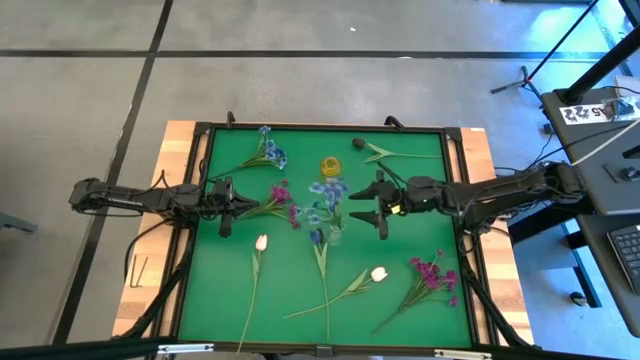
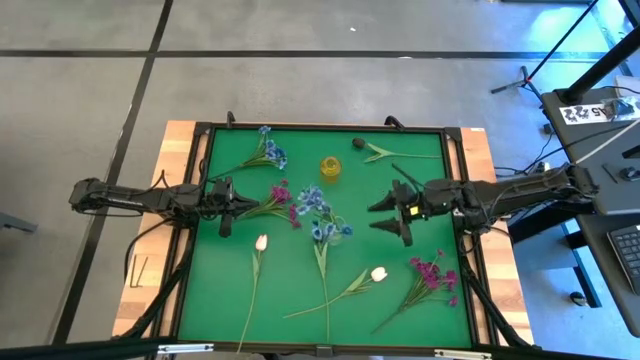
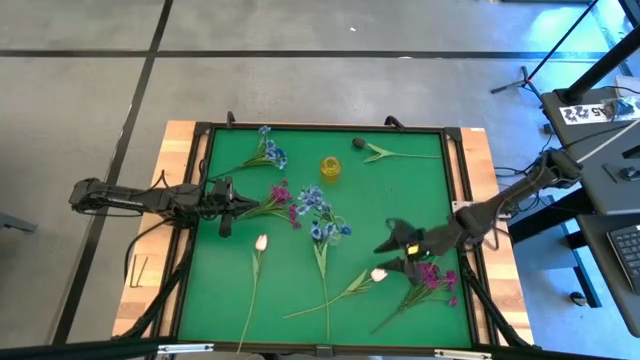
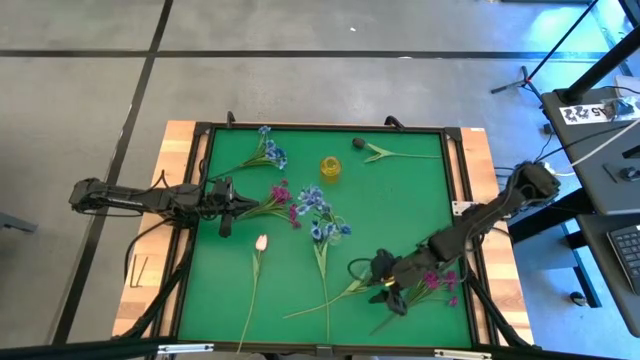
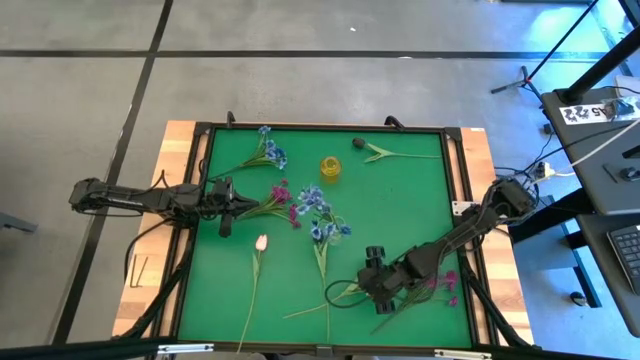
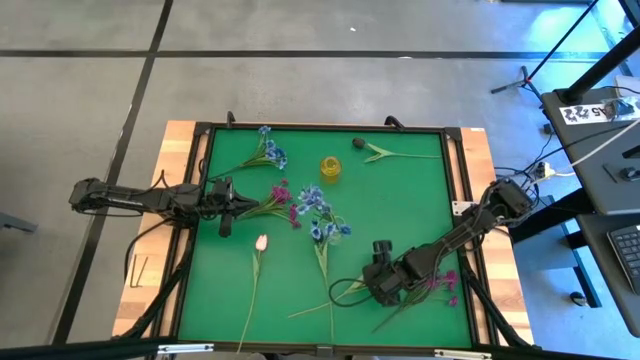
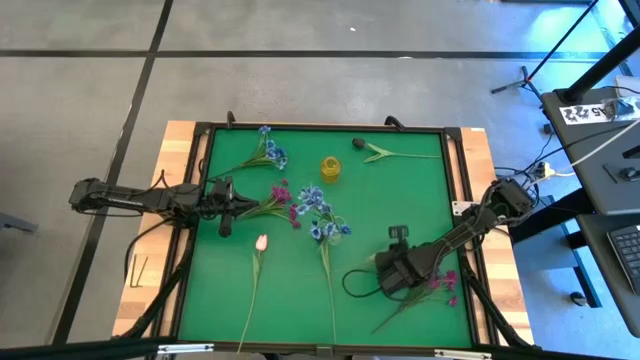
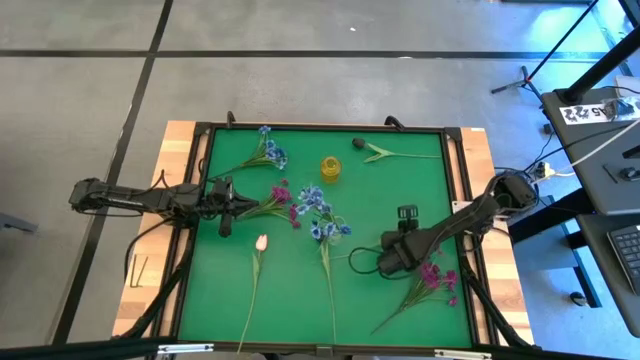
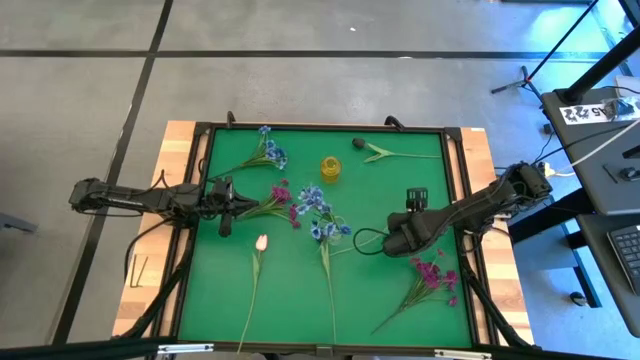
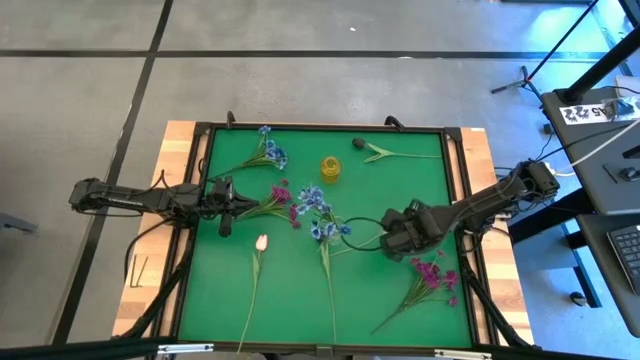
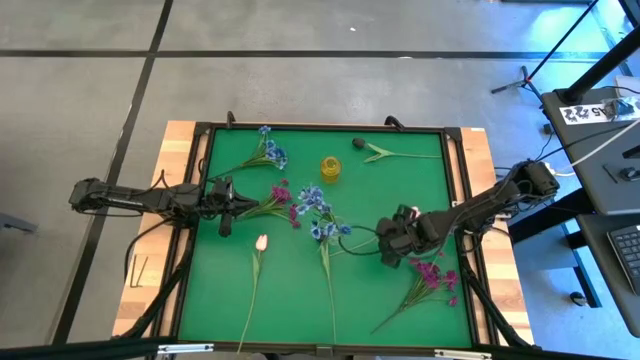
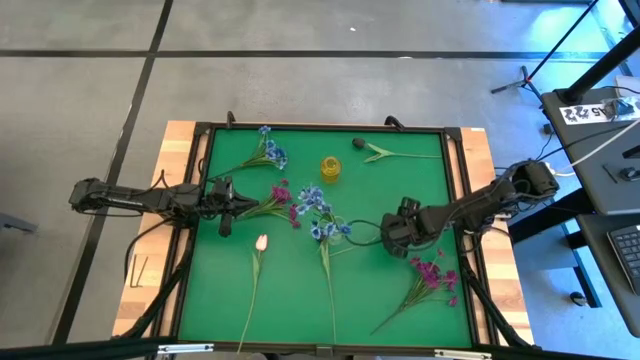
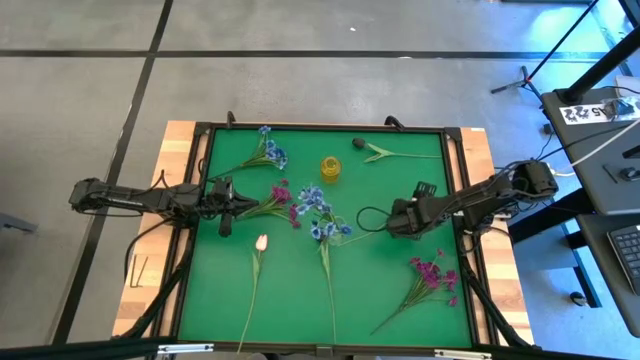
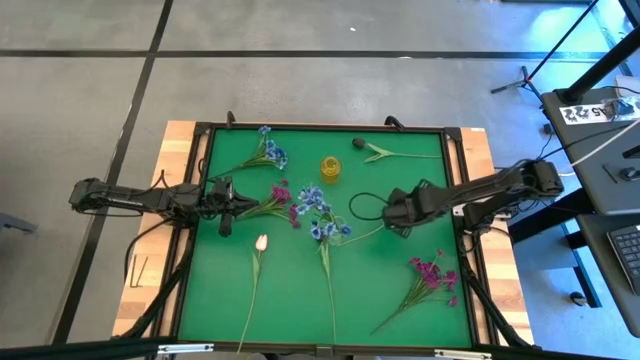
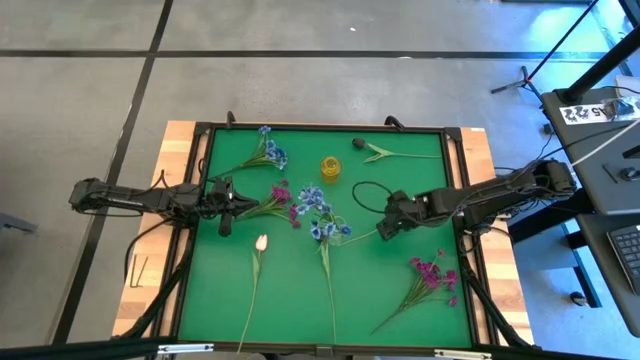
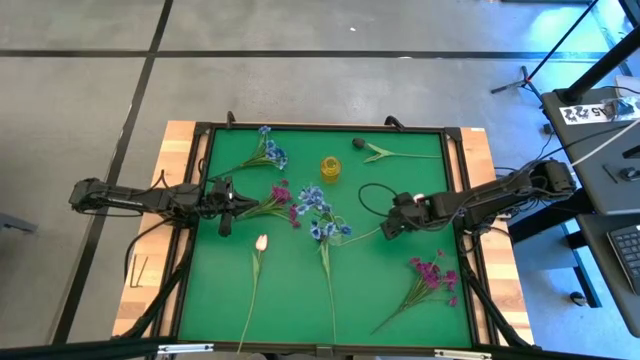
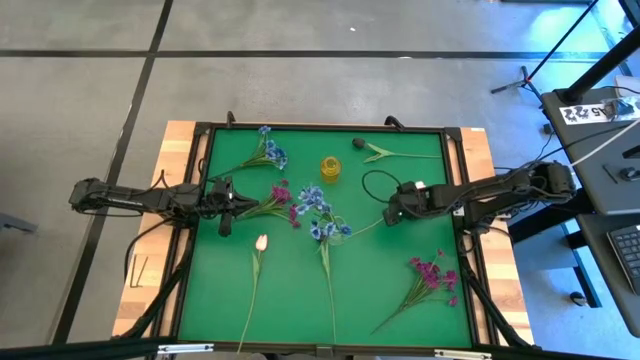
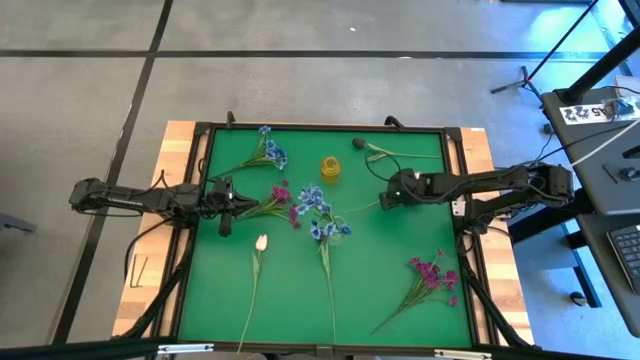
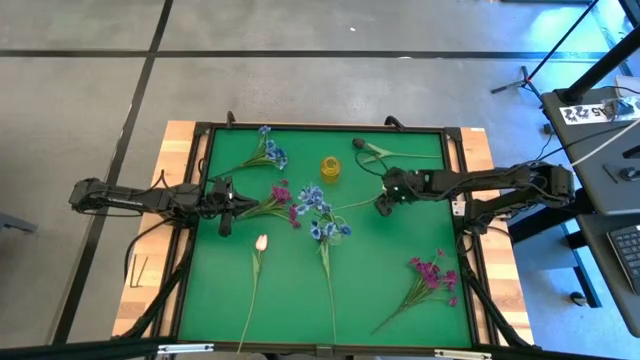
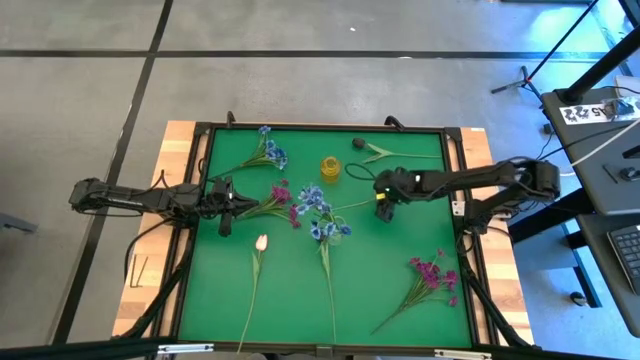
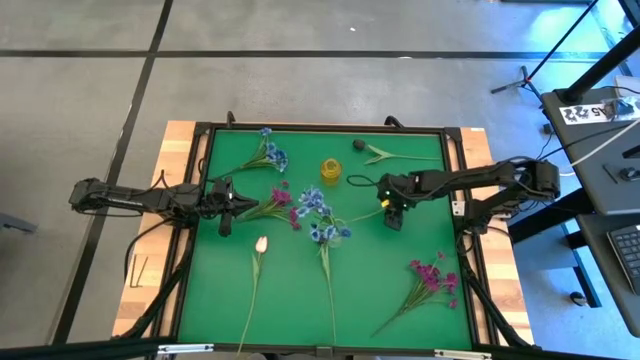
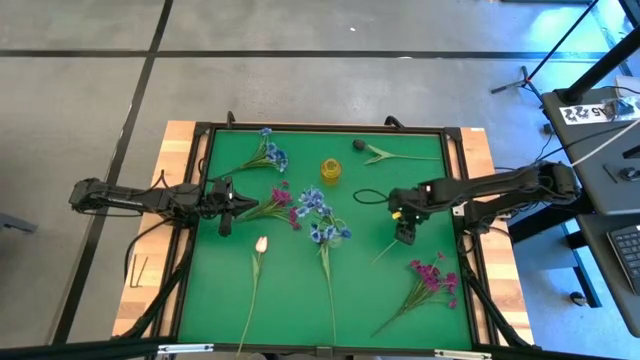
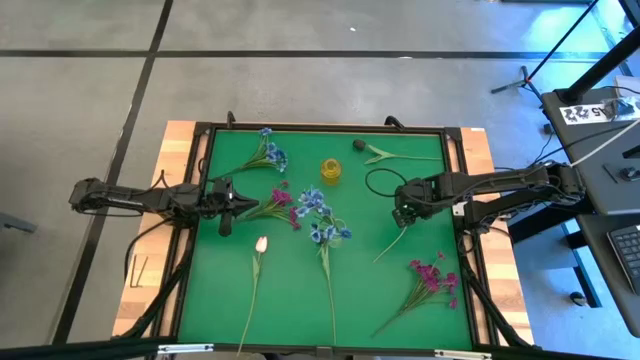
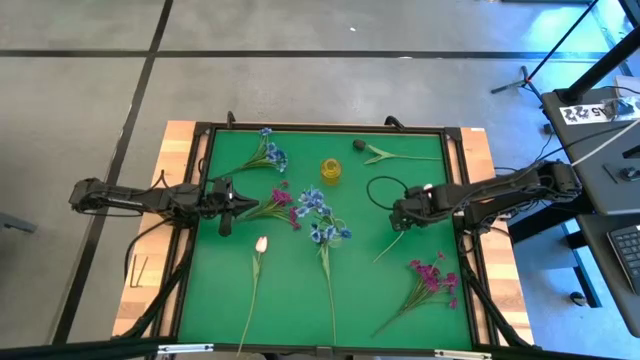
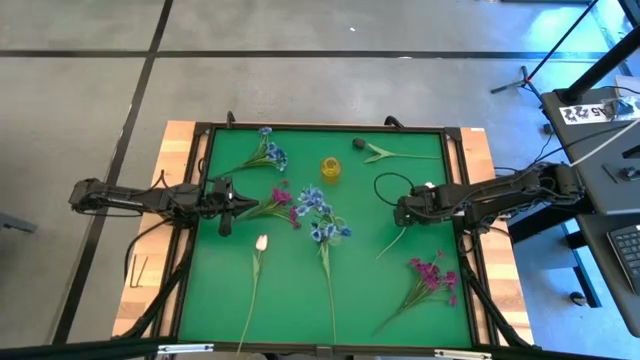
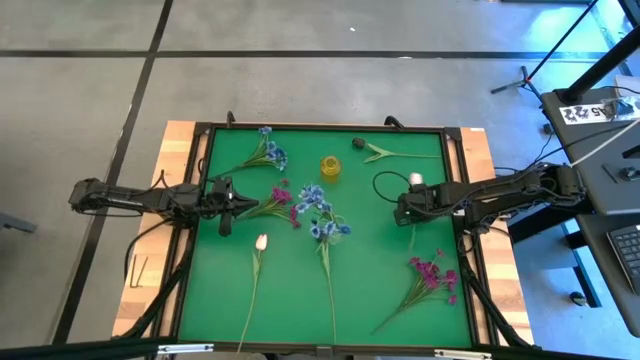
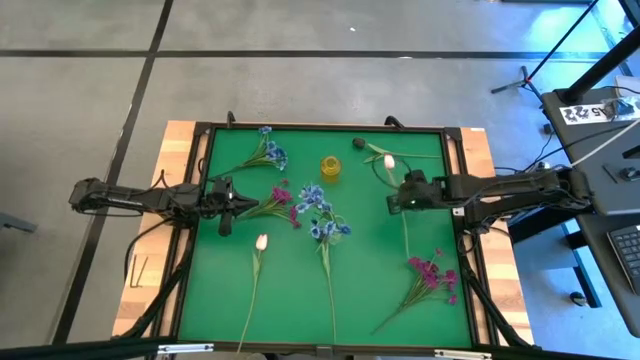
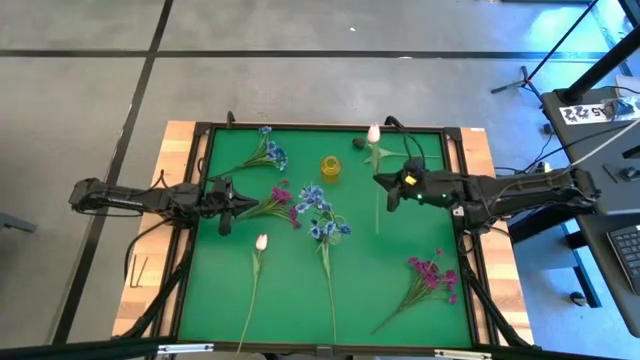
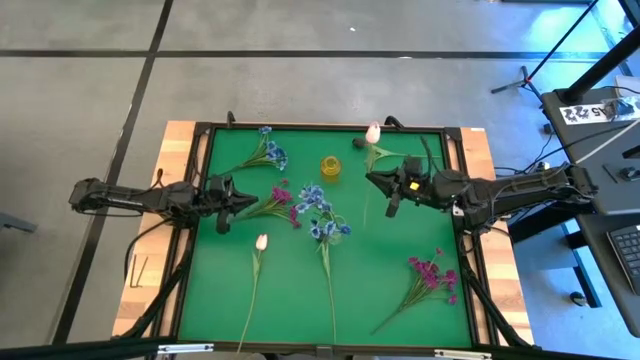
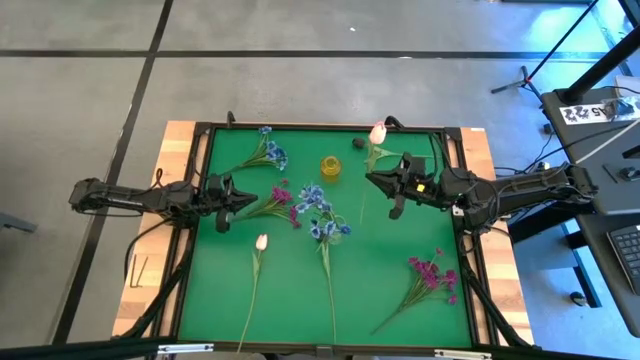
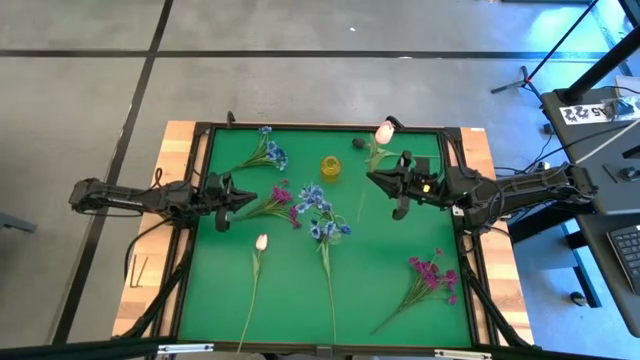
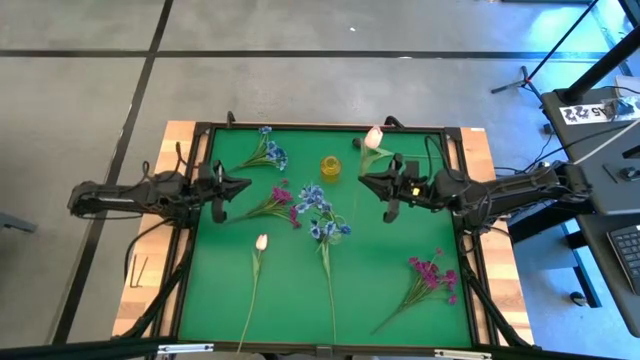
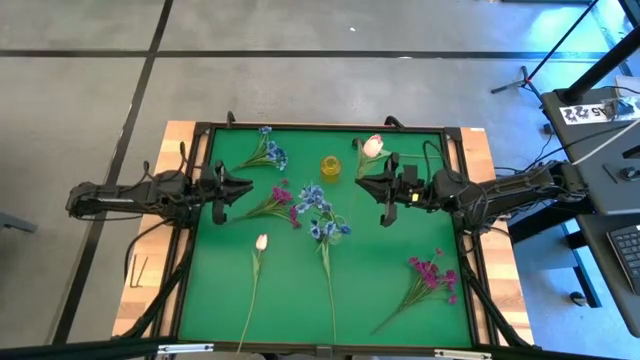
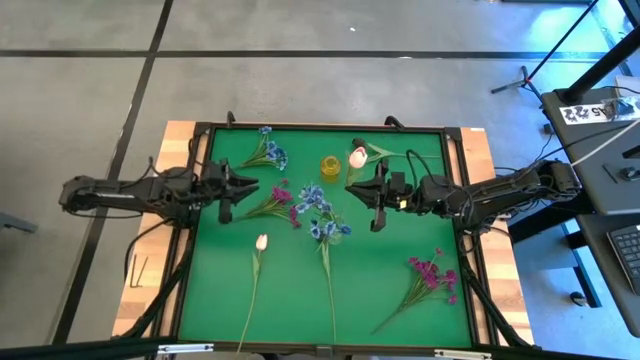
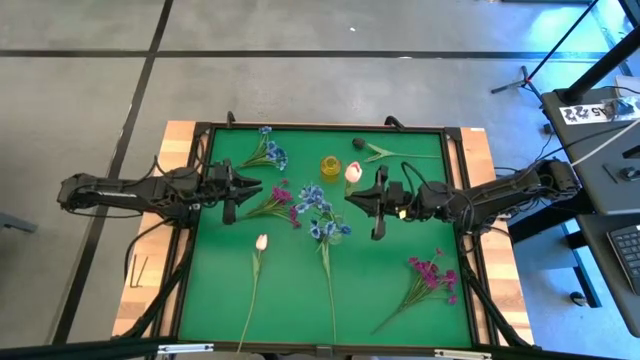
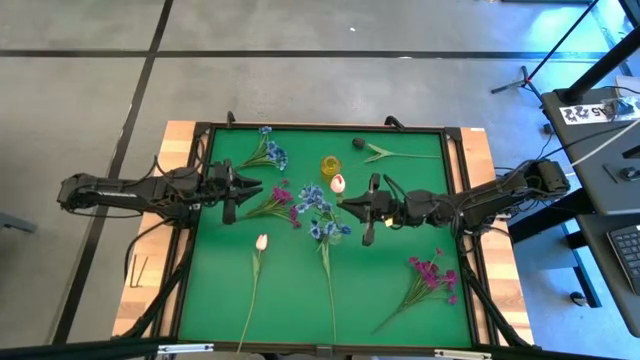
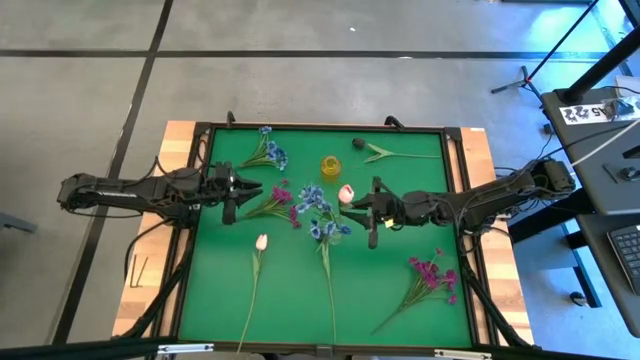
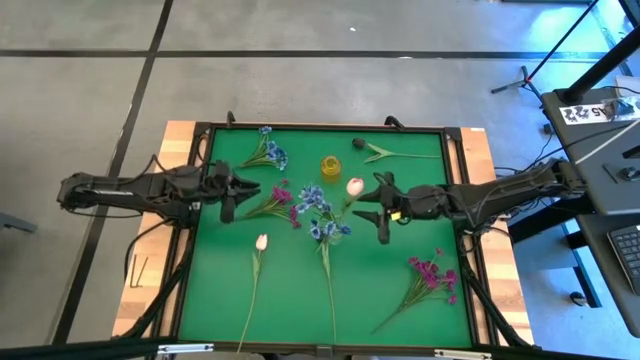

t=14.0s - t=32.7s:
Task: Sort flowers into vase by color
Put the right pink flower into the transparent vase

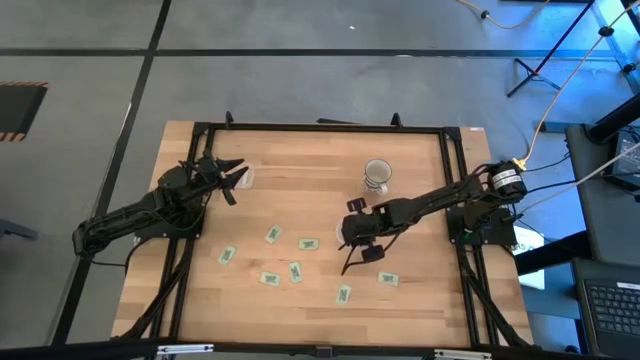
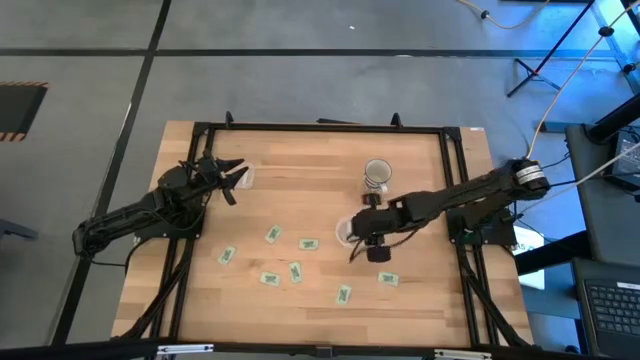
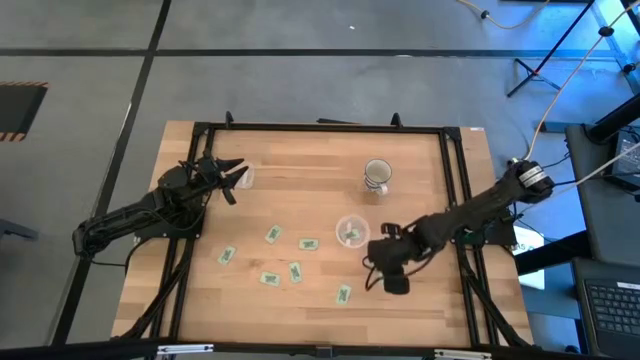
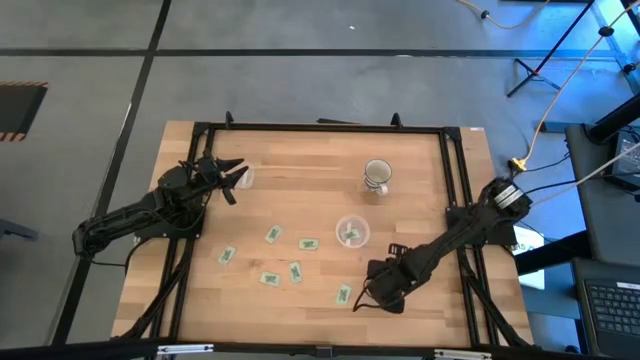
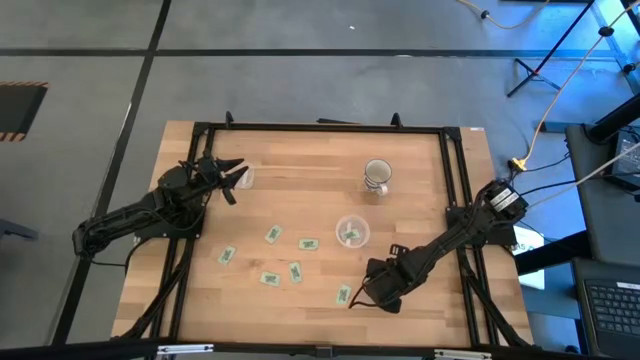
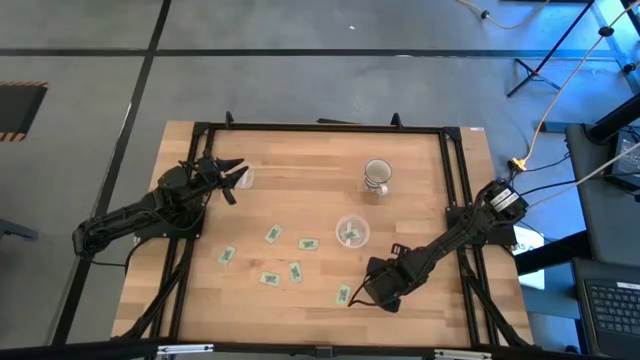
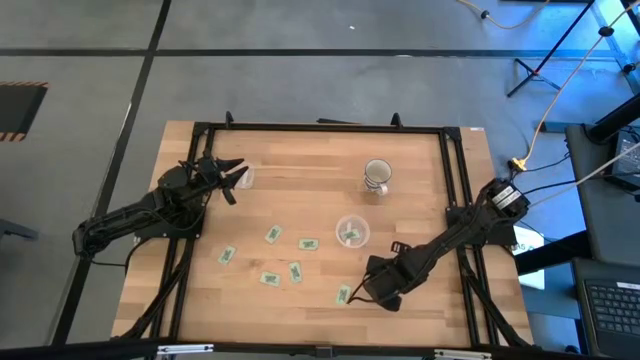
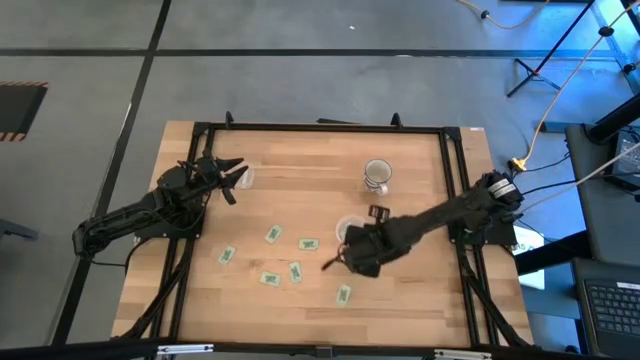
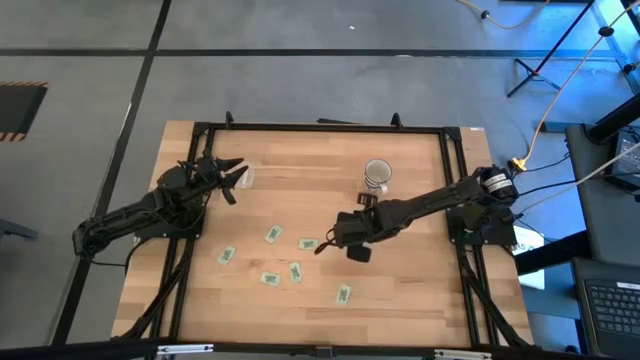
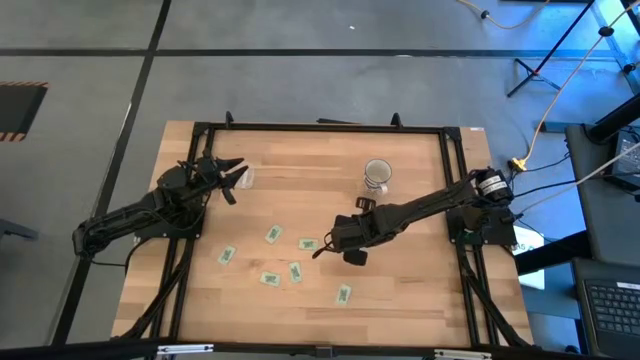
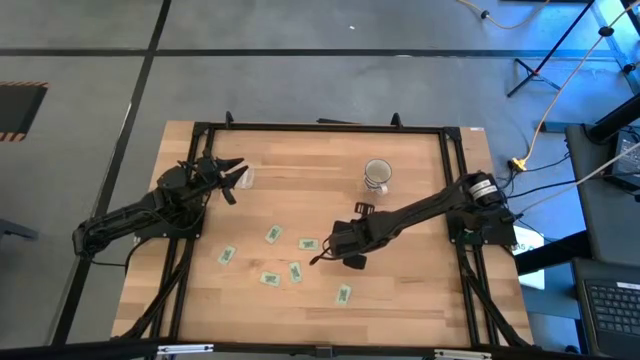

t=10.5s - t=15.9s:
Task: Pick and place Stevia / Truvia into bins
Put the green stevia packet into the circular transparent container
